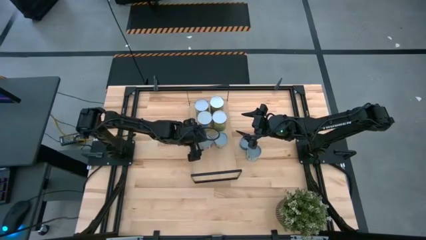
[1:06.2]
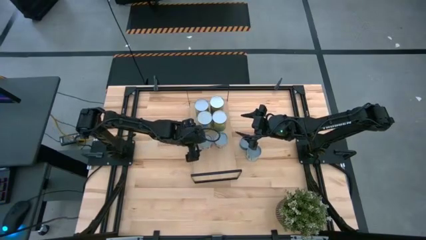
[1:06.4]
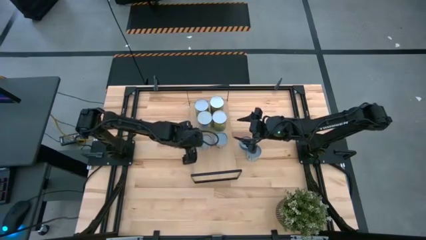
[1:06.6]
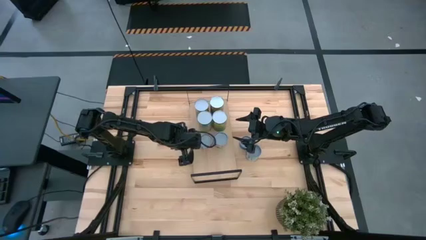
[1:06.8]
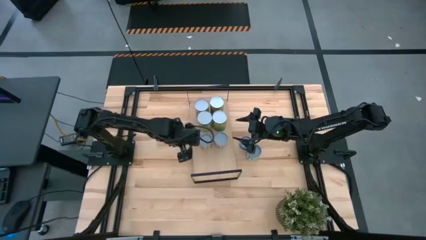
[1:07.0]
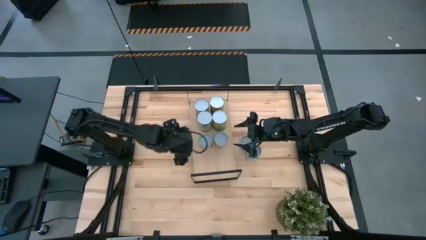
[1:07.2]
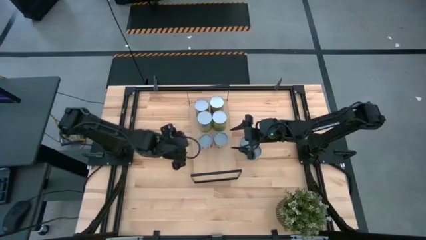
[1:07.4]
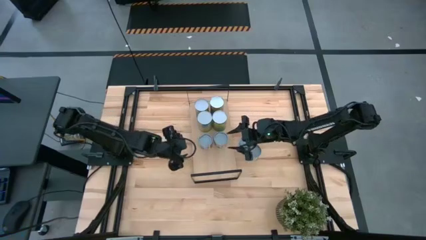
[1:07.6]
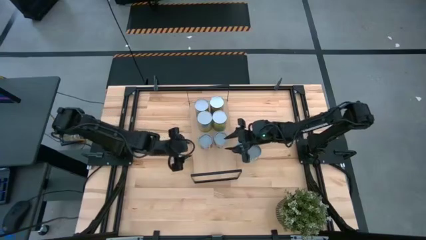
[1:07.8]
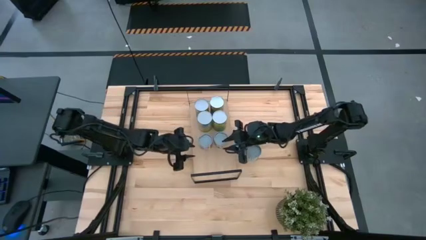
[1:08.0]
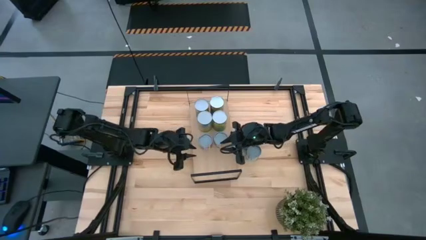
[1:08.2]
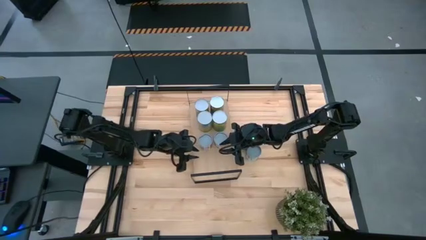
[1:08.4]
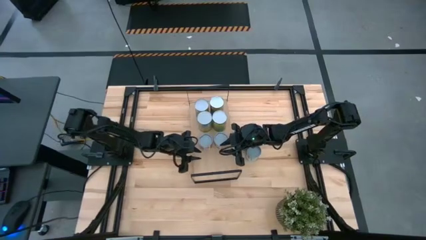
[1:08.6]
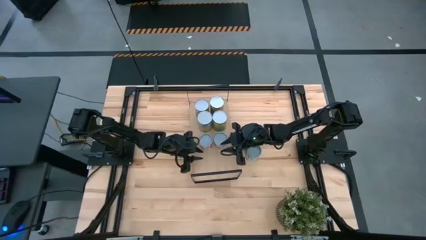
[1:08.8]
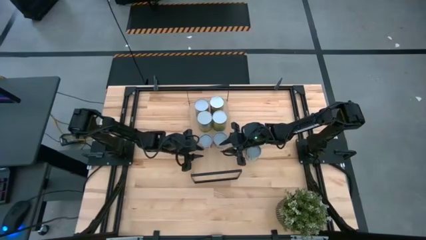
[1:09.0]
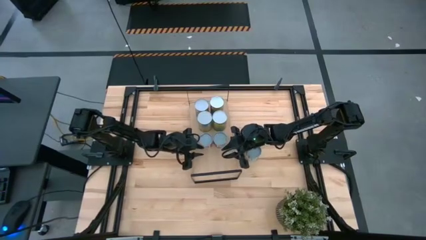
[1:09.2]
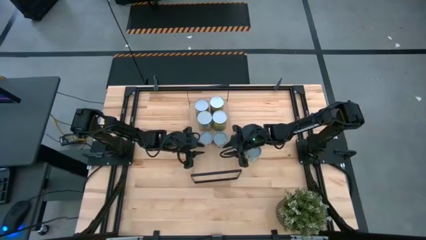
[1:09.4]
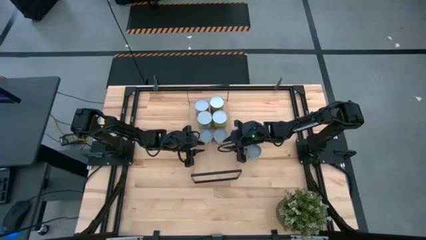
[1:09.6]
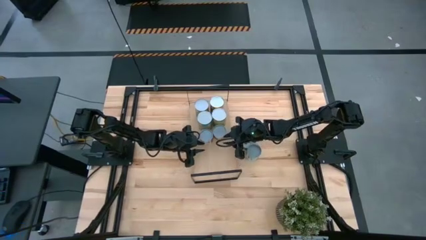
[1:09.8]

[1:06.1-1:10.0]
Task: Pick and place cans onto a shelf
Adjust the cans on the shelf

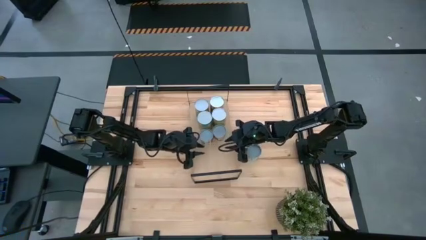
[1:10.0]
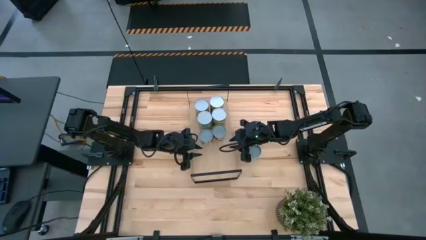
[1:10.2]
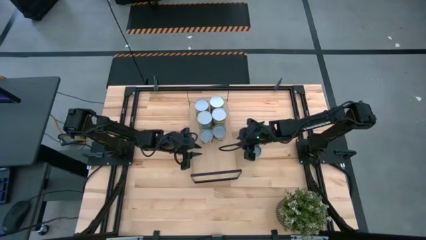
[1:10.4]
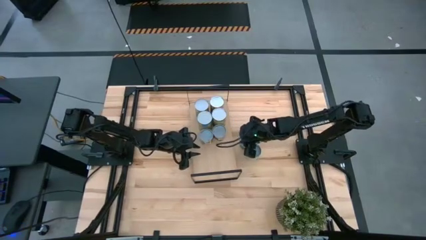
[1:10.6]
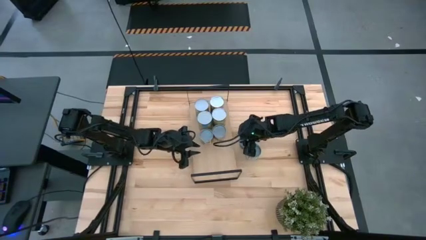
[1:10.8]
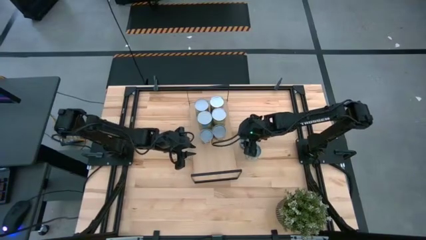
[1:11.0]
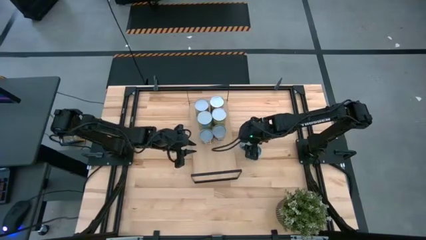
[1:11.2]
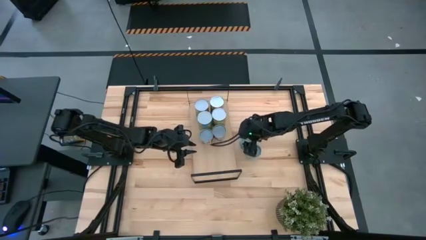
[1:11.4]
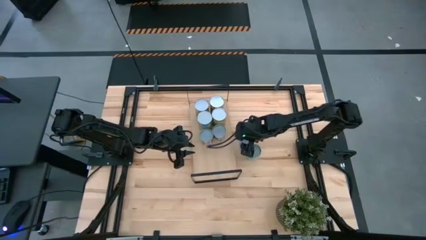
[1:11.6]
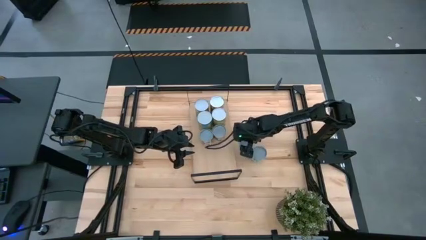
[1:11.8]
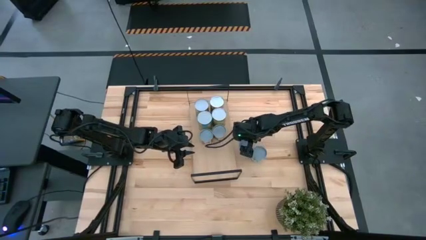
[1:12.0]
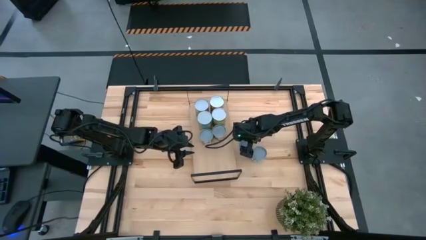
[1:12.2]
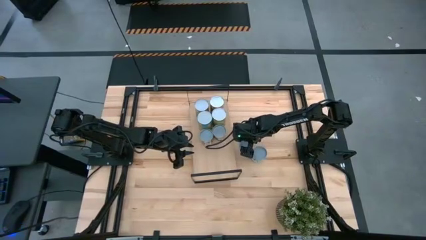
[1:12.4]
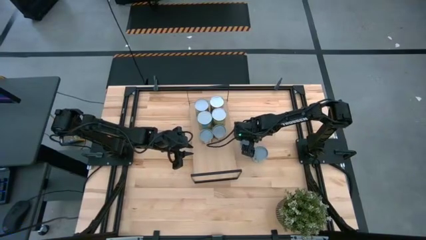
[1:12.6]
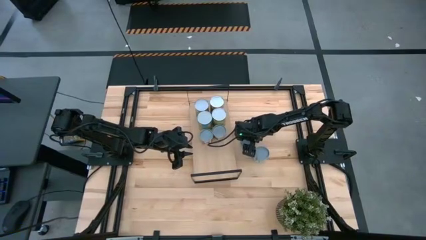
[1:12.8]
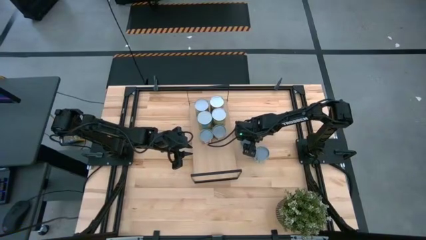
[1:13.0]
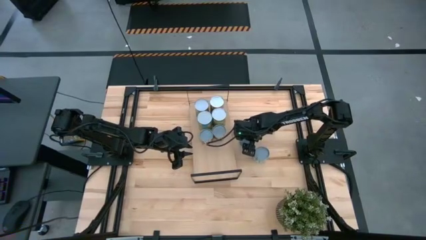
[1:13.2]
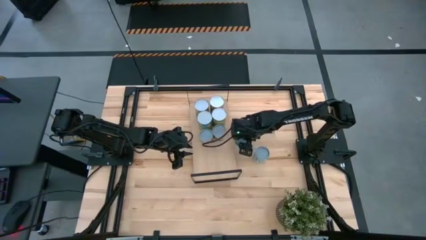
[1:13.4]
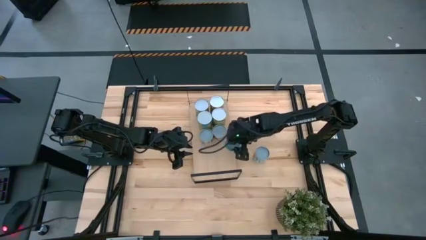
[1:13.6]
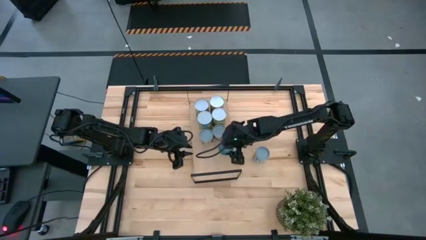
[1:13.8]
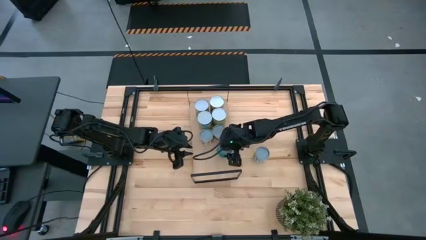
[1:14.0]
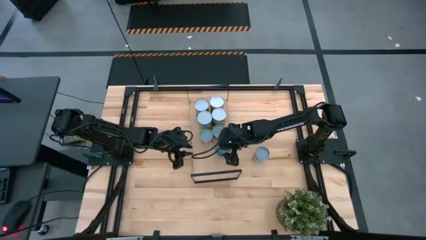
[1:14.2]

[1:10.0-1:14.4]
Put the canned tuna on the shelf

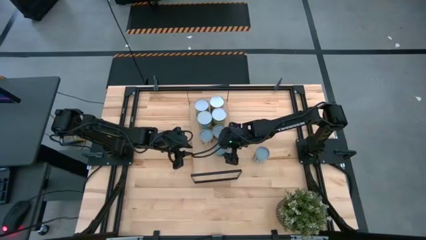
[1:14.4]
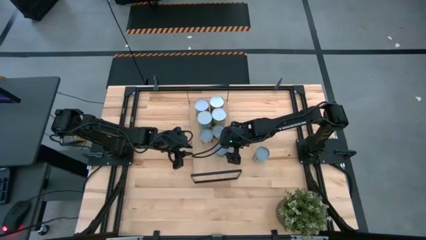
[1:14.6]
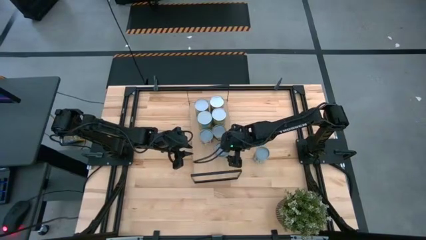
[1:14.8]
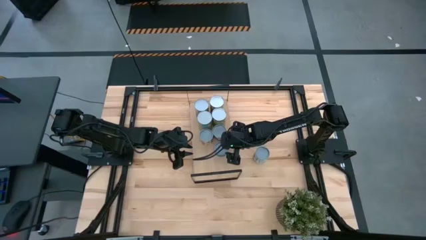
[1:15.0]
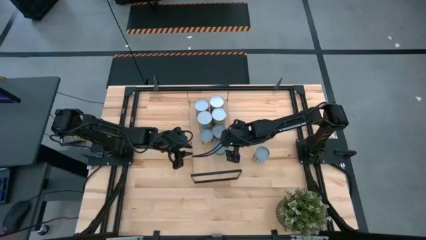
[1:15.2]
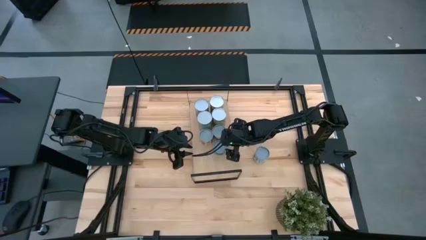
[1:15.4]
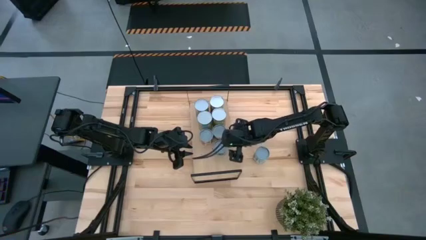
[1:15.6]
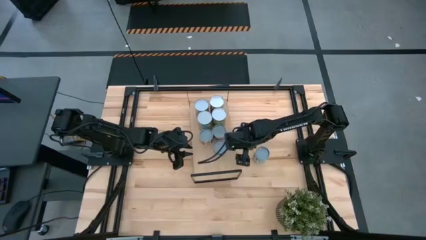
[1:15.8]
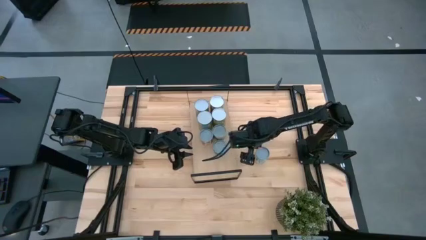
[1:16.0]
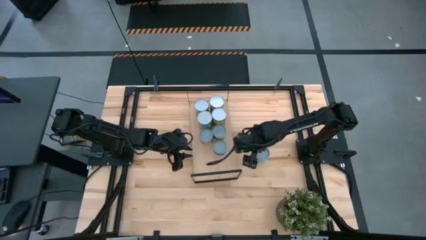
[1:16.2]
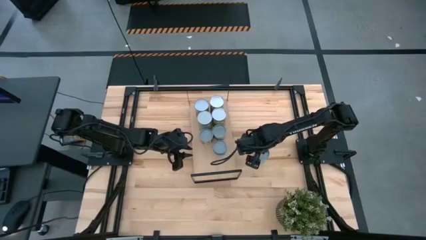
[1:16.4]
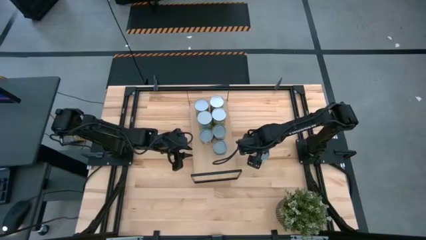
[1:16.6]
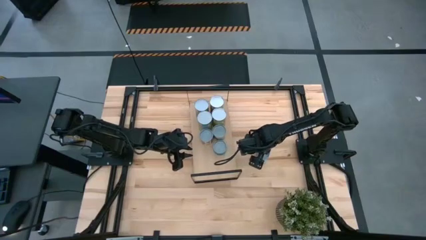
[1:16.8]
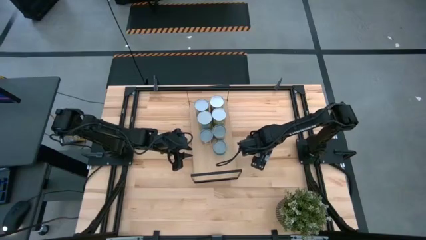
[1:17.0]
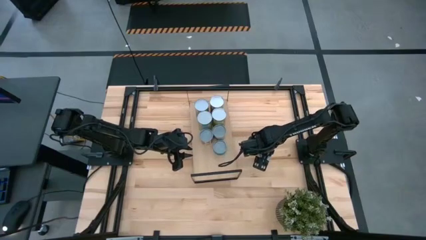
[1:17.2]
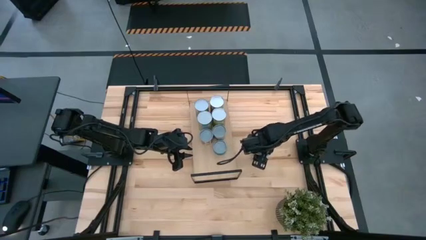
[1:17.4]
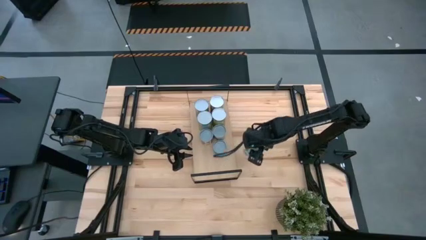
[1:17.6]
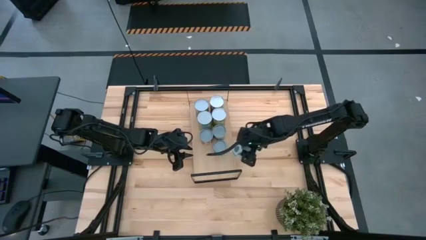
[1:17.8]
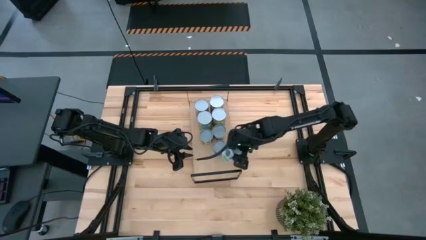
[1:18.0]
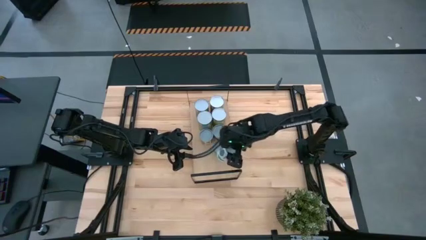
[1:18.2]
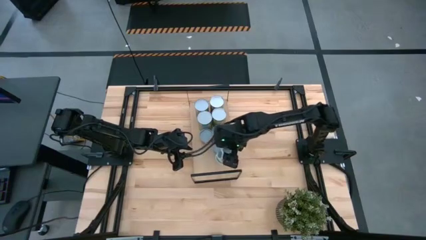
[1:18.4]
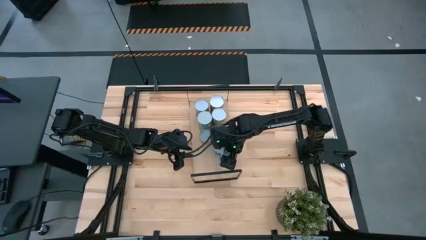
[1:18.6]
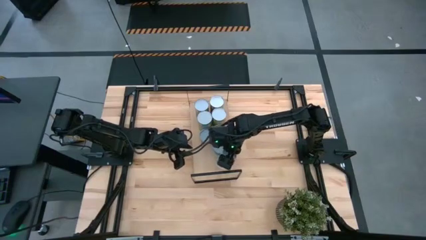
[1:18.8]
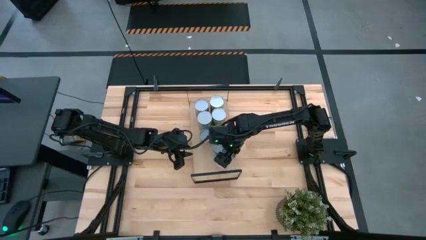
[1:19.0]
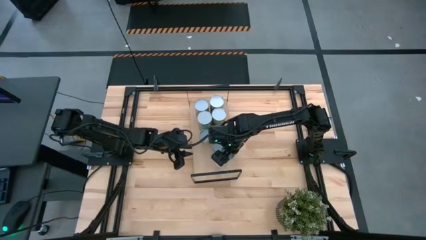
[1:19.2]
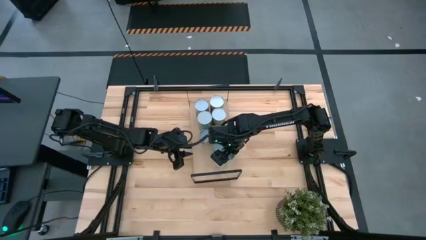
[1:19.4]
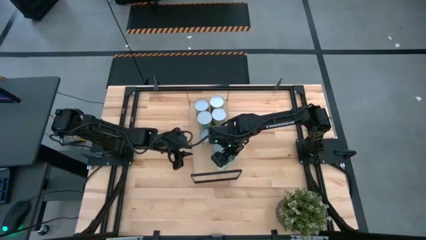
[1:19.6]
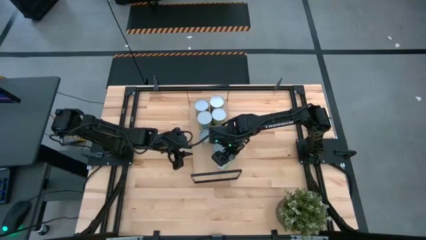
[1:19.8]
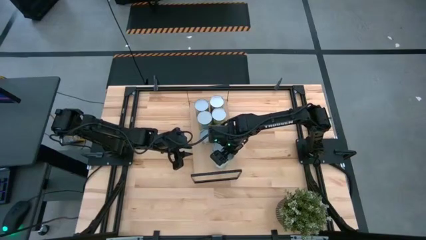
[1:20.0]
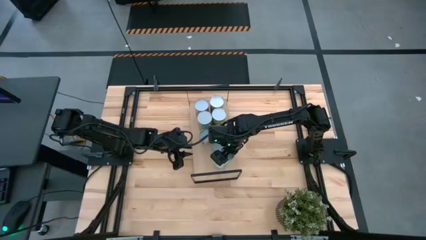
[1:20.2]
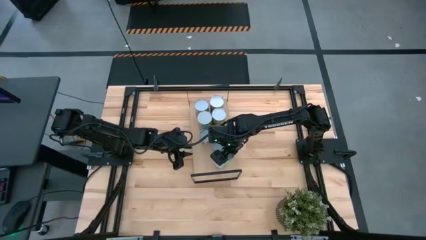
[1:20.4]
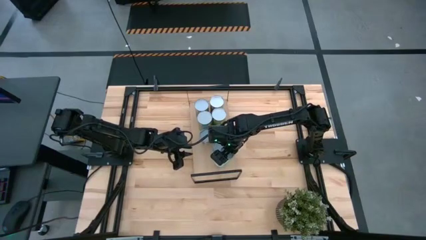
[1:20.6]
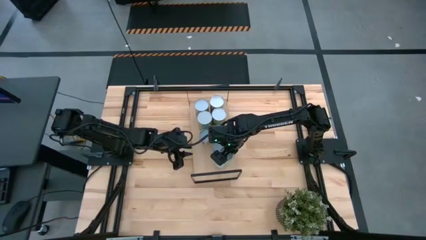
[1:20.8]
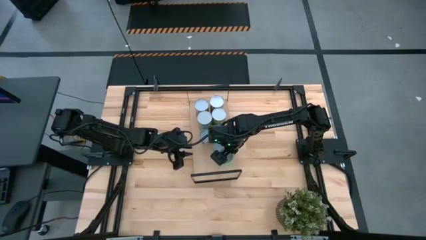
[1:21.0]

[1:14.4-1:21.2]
Put the canned mixed vegetables on the shelf
